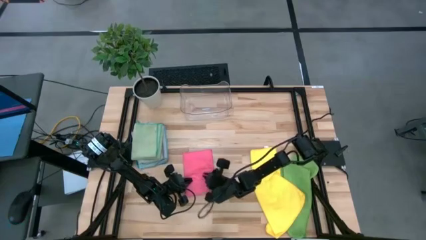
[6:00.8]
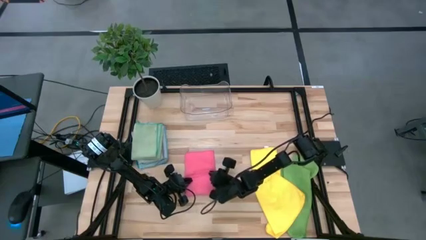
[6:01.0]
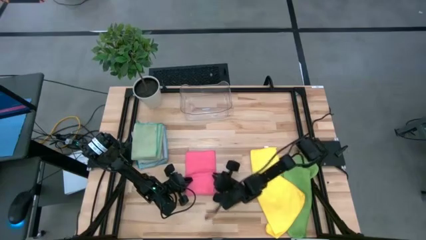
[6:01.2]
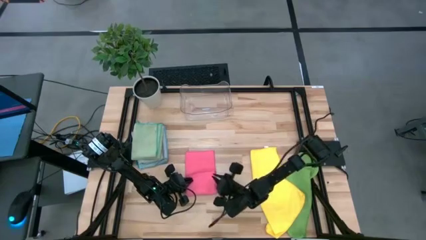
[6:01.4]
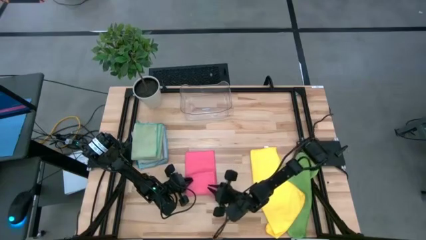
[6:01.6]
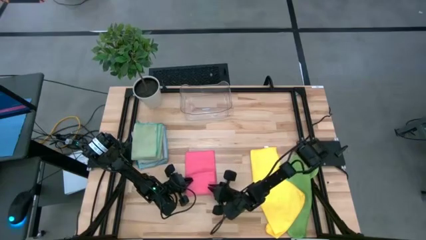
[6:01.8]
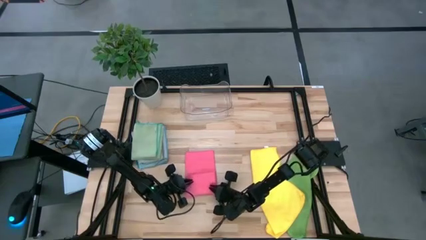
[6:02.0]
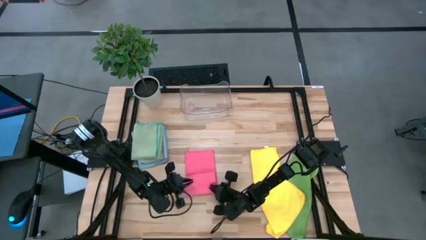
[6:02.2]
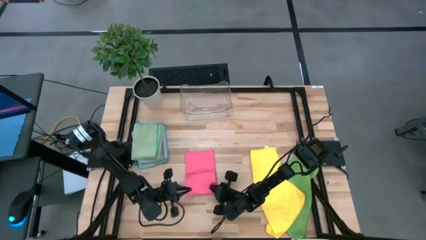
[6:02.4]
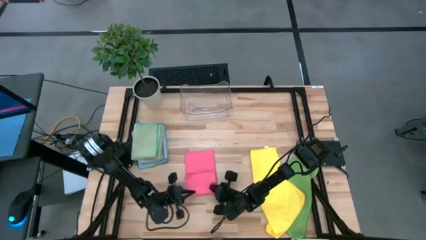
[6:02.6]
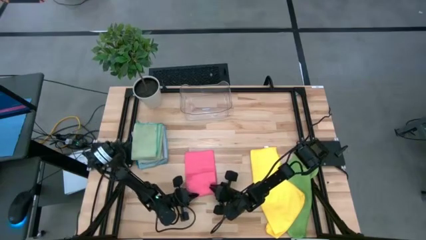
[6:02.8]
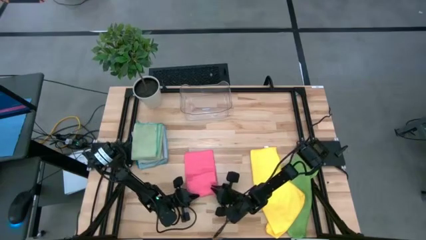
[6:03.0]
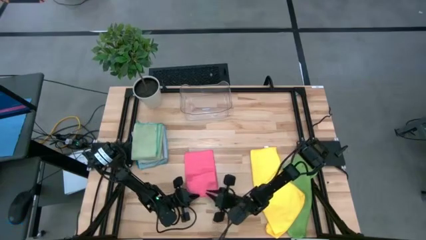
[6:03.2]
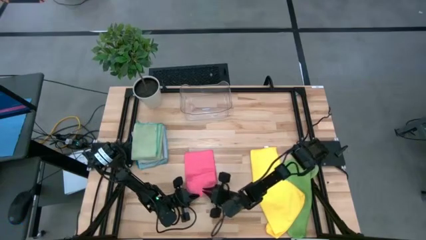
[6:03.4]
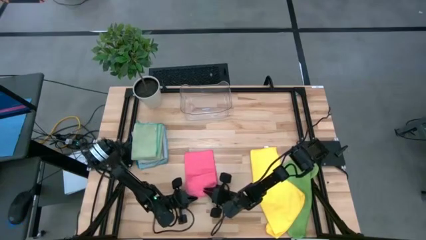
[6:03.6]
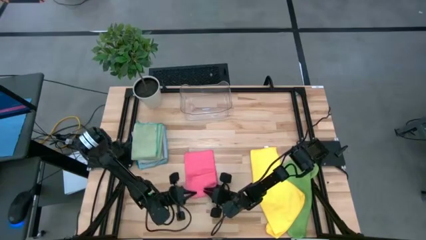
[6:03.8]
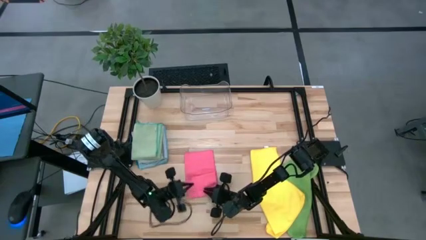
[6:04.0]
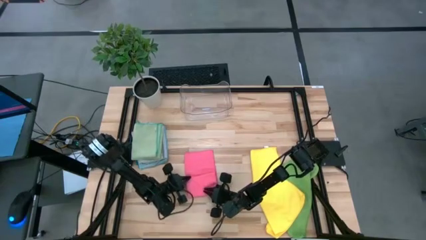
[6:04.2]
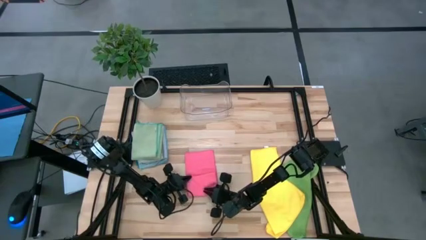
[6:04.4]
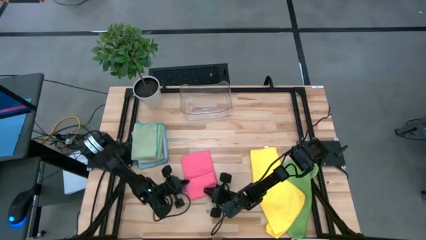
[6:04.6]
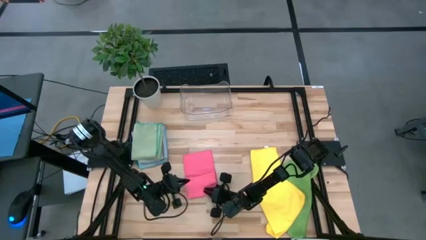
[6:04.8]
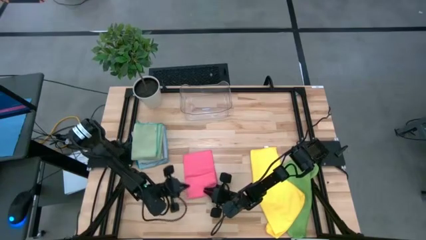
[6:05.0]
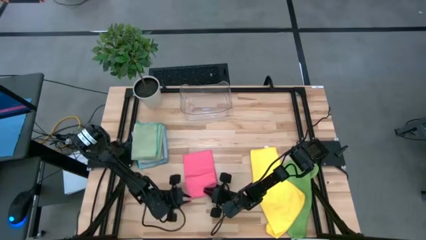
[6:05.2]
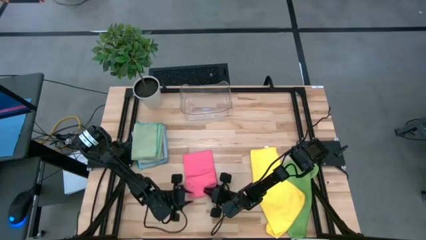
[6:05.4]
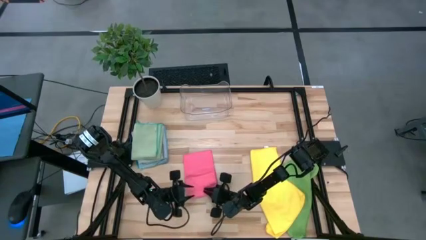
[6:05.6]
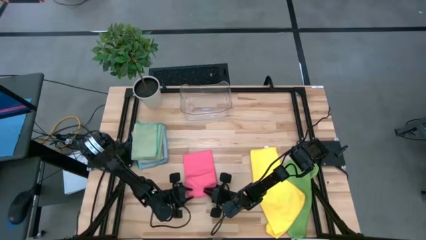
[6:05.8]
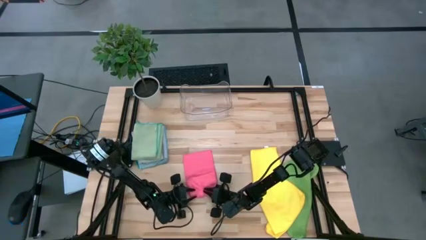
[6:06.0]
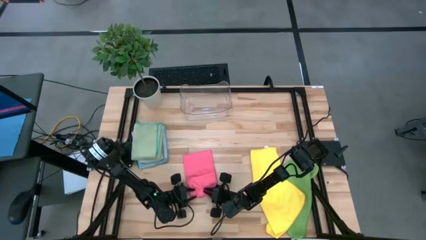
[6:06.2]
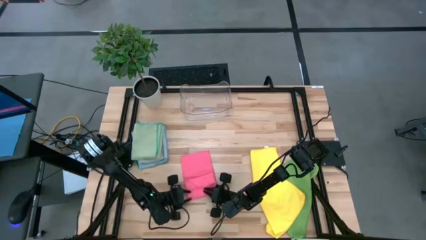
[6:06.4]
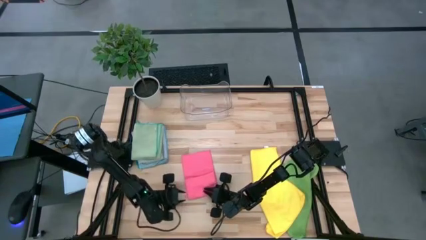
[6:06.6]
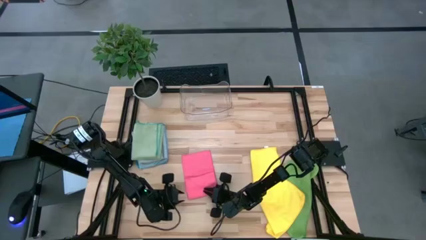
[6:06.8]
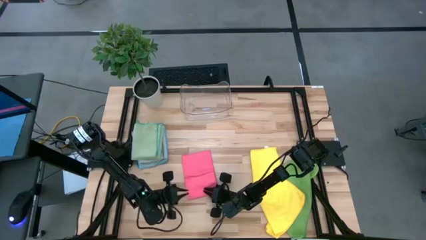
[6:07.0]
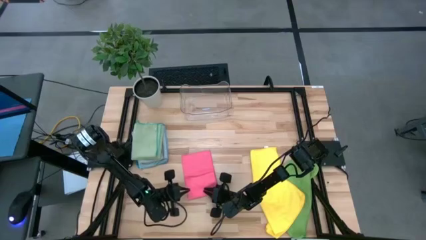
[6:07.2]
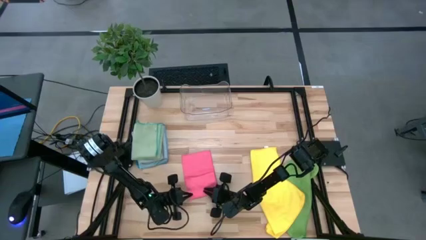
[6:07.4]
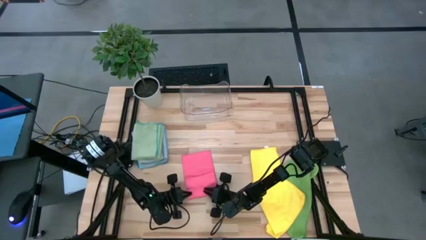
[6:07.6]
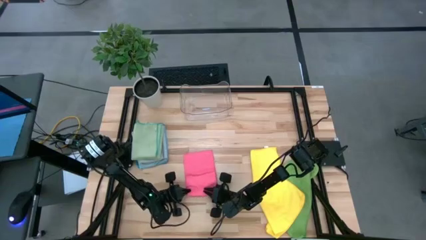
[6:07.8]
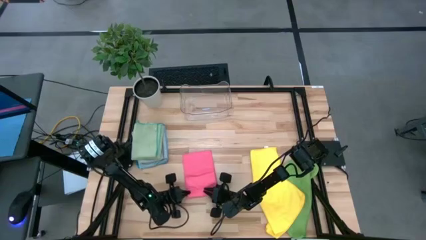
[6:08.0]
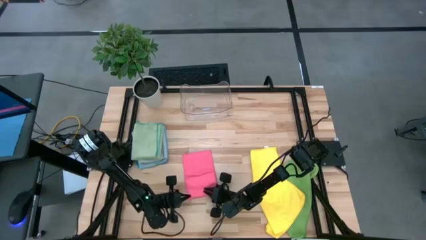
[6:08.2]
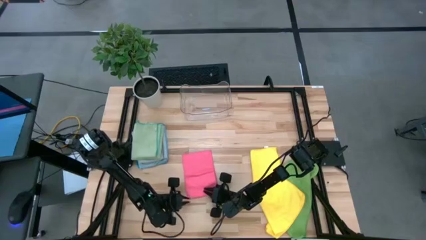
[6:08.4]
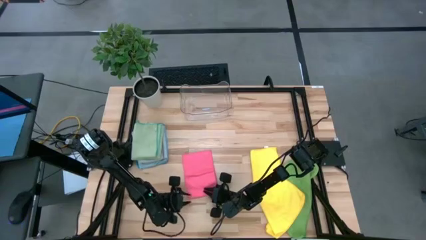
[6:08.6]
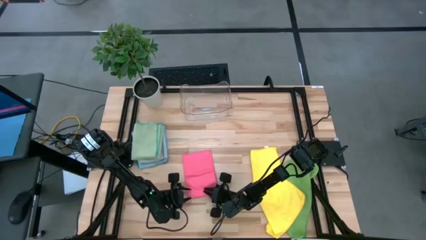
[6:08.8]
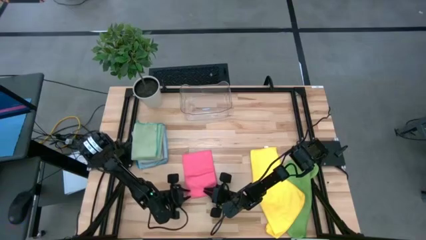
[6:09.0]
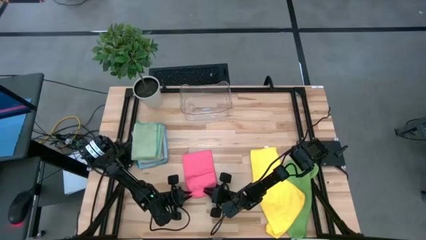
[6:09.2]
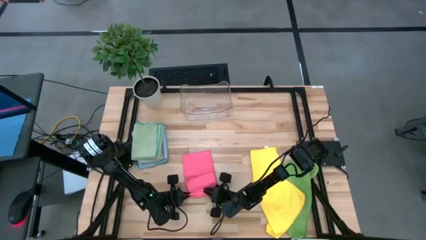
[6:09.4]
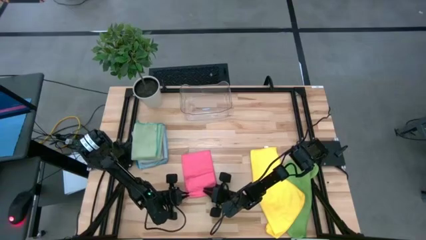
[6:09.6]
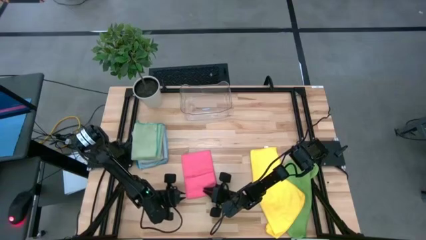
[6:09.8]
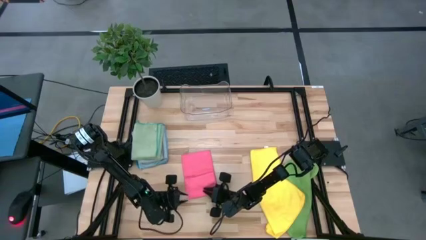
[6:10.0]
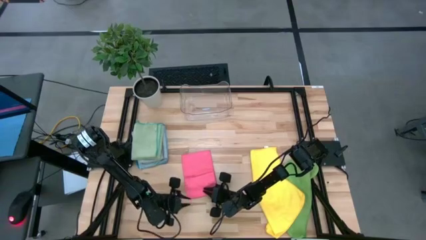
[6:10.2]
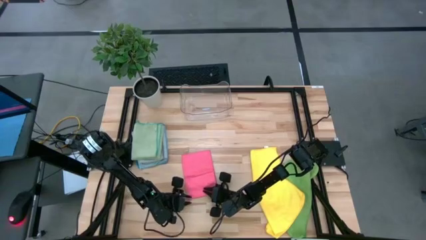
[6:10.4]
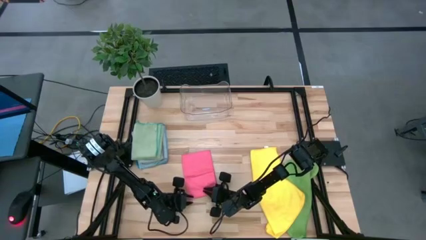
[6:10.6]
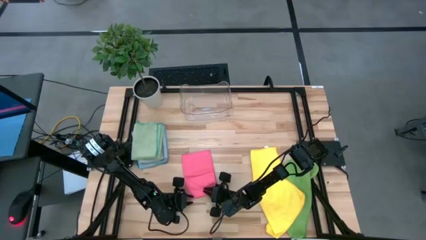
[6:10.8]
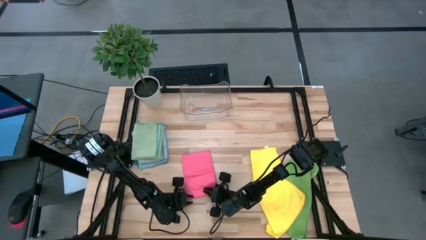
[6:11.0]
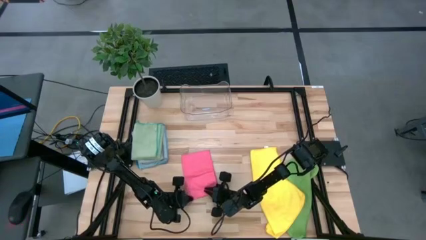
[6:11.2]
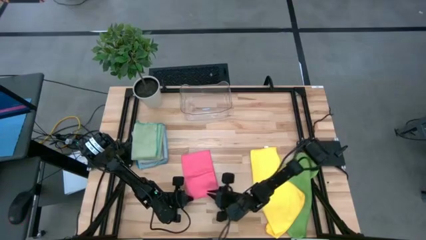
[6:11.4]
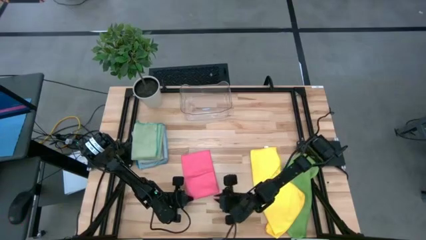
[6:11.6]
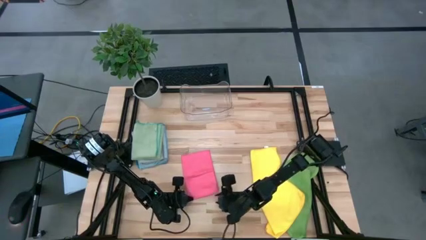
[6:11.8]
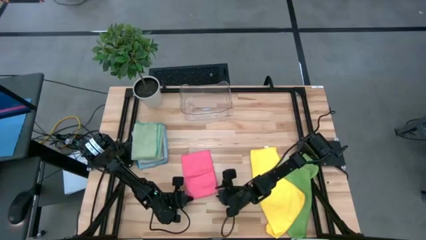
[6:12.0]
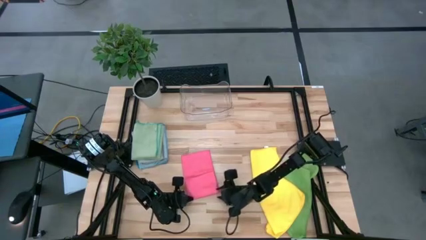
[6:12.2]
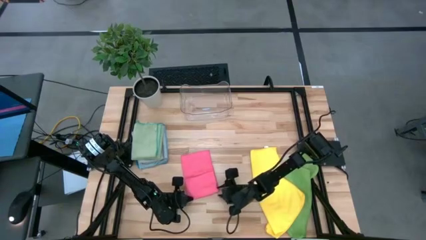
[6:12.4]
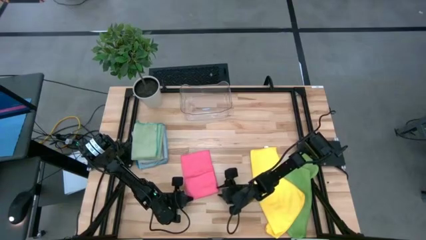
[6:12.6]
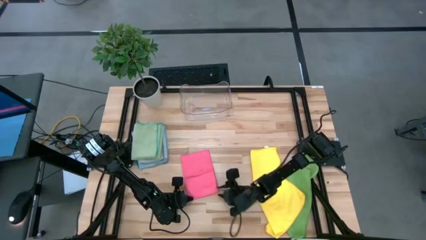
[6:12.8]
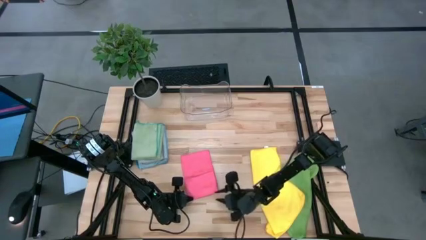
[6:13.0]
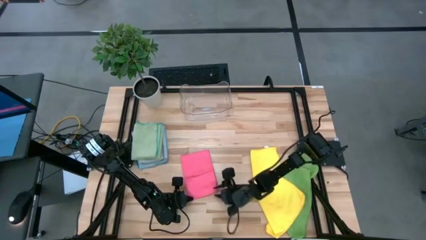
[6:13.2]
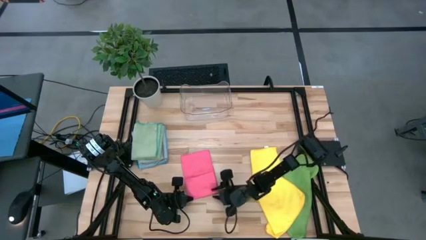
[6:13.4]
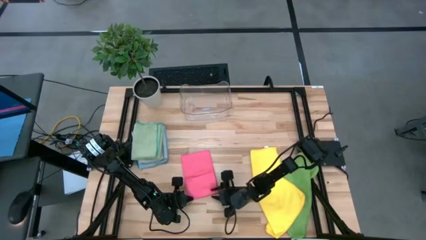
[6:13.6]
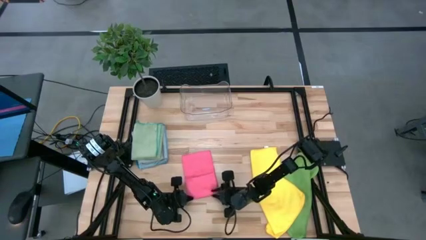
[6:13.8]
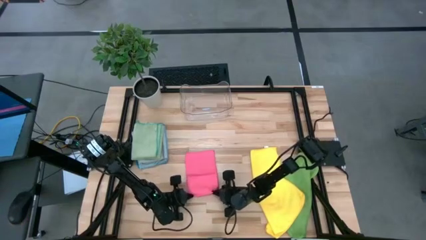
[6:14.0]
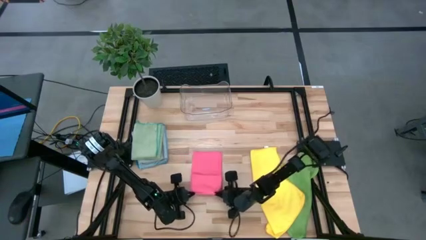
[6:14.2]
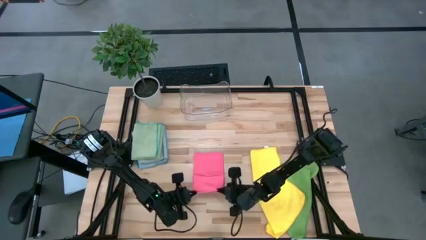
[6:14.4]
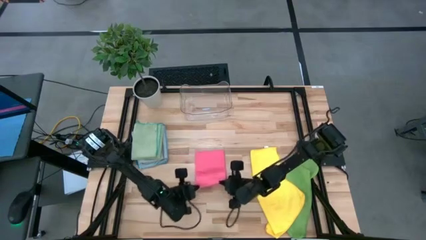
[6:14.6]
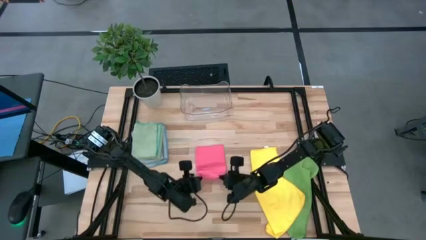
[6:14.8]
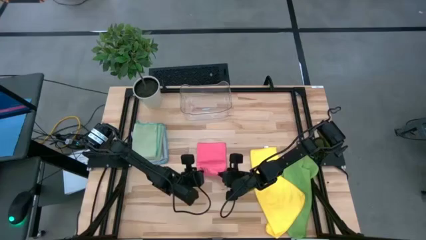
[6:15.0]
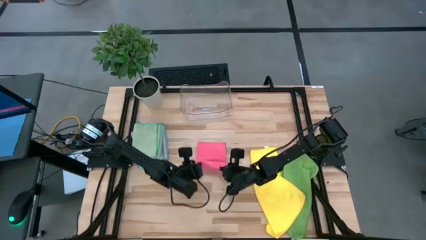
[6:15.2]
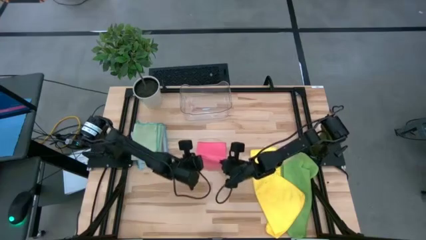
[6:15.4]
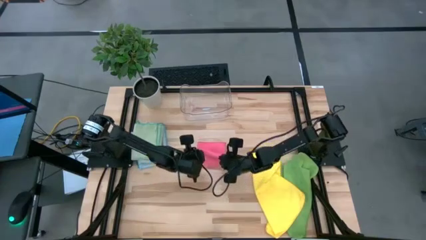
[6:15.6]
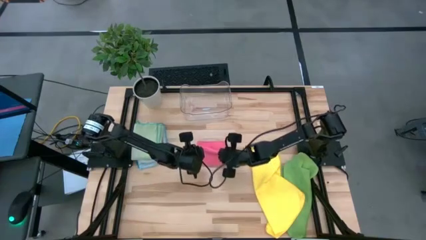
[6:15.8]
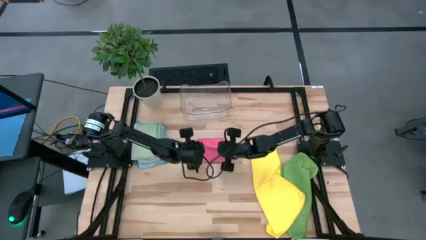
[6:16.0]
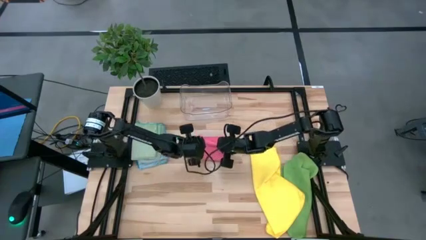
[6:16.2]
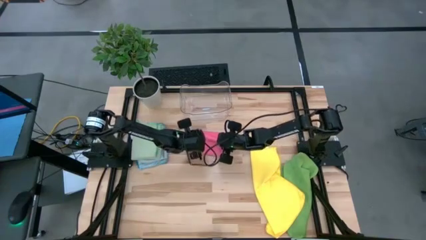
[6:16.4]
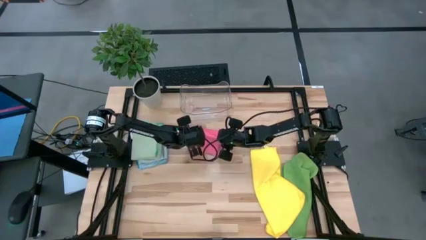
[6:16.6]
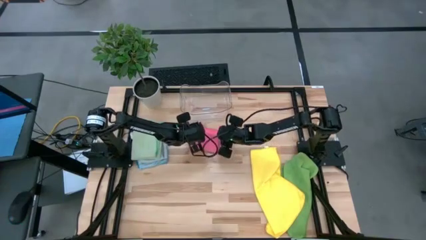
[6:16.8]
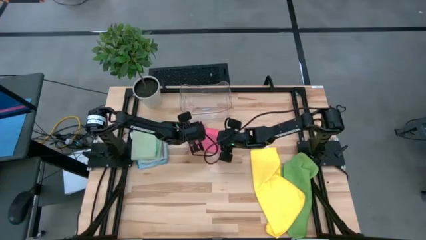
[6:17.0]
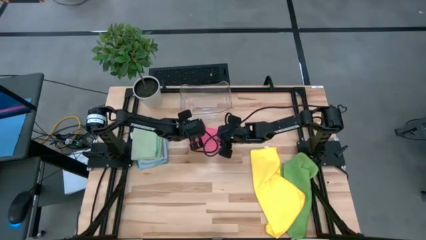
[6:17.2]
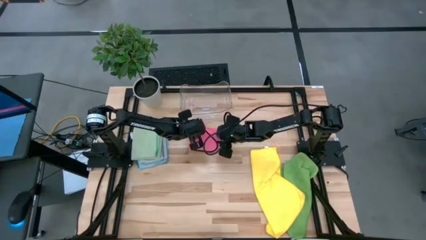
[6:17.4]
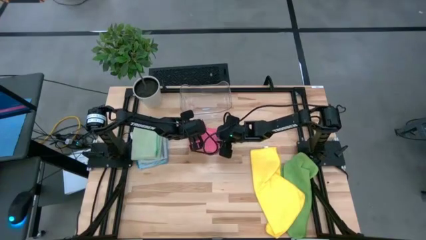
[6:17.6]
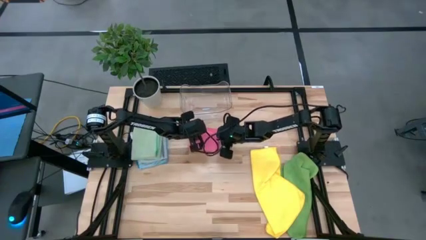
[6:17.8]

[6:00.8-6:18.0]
Task: Fold microfiber towels
Fold the pink microfiber cloth
